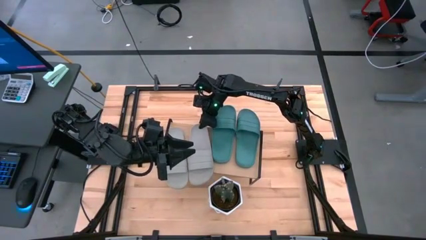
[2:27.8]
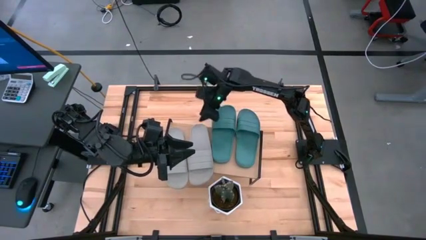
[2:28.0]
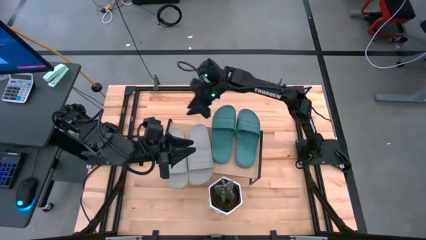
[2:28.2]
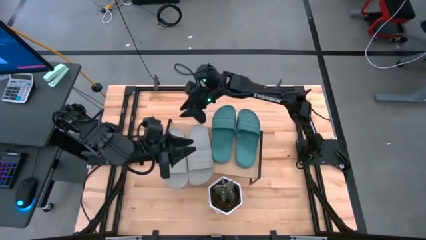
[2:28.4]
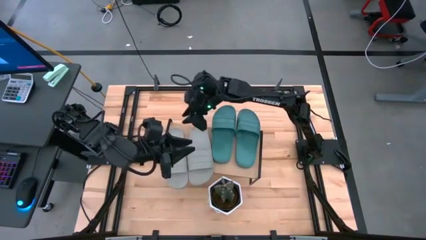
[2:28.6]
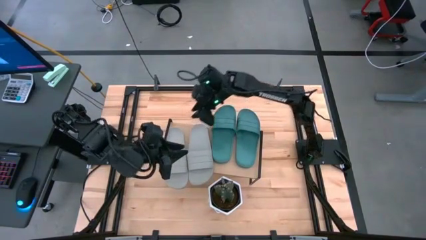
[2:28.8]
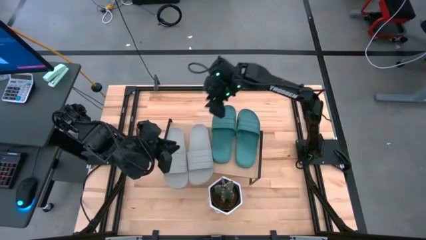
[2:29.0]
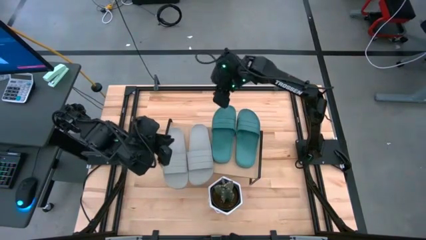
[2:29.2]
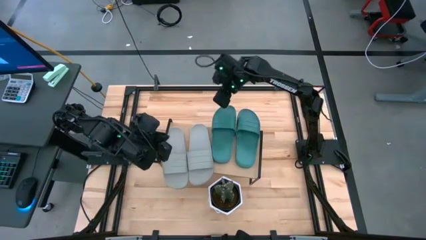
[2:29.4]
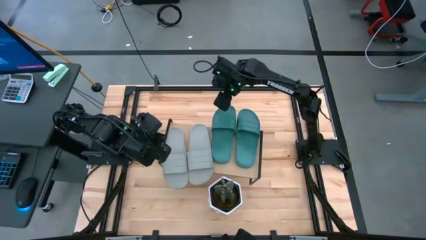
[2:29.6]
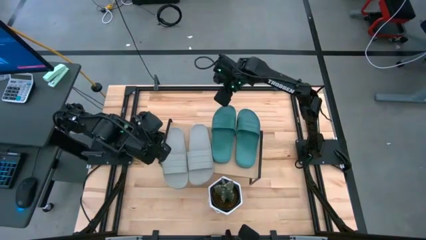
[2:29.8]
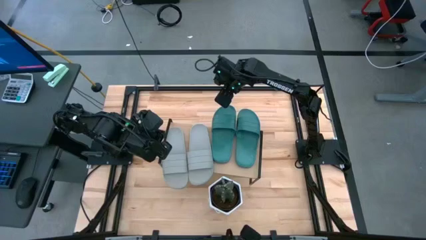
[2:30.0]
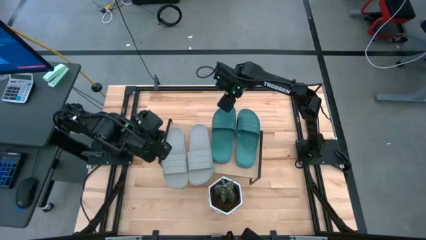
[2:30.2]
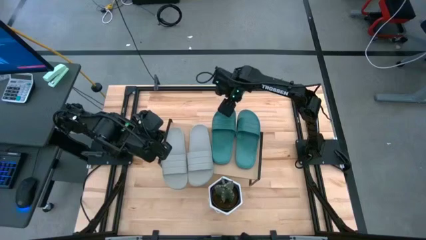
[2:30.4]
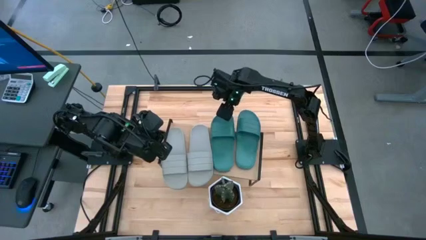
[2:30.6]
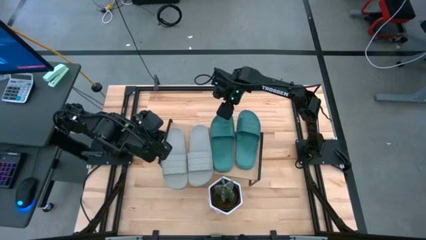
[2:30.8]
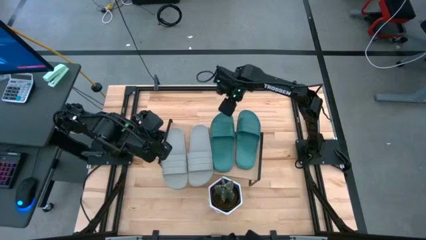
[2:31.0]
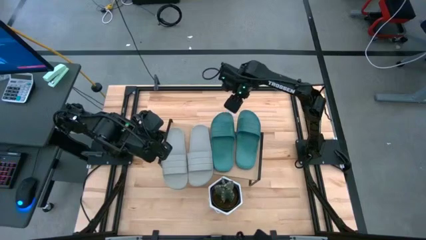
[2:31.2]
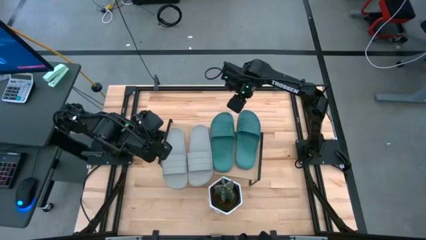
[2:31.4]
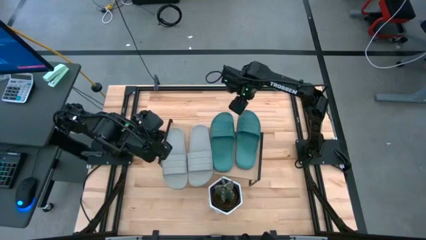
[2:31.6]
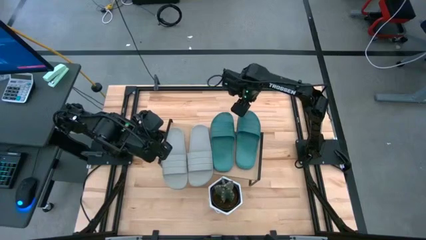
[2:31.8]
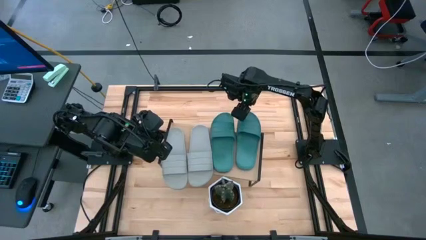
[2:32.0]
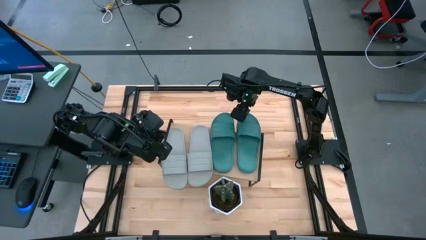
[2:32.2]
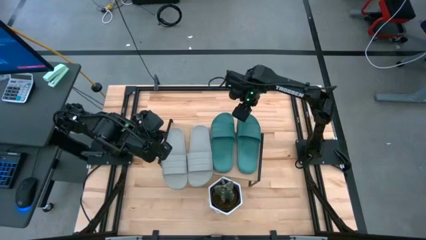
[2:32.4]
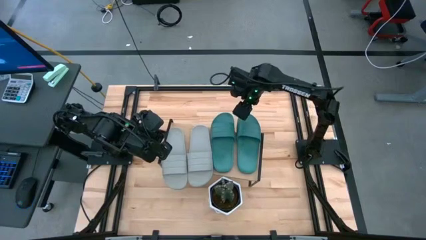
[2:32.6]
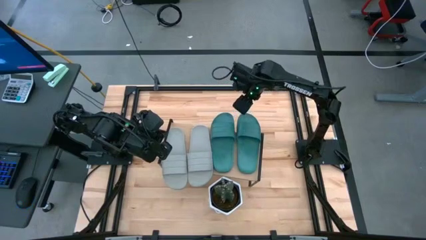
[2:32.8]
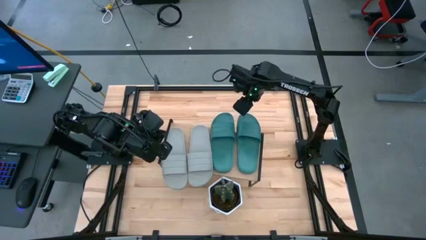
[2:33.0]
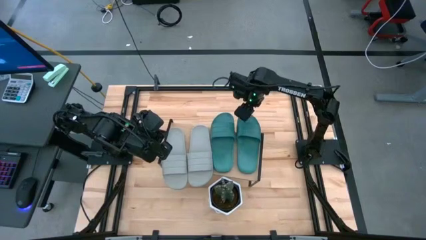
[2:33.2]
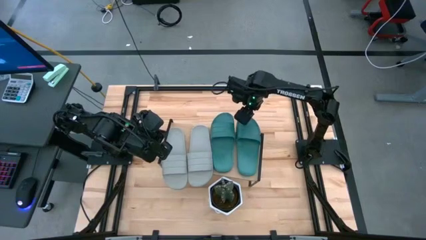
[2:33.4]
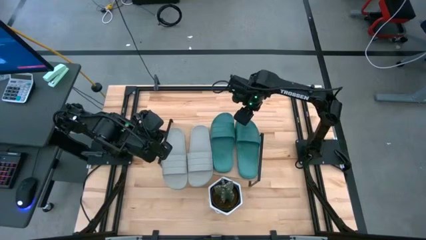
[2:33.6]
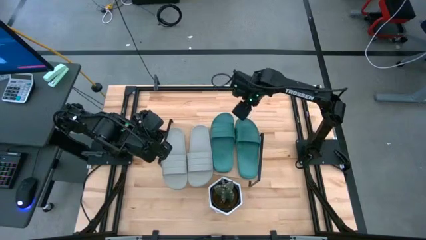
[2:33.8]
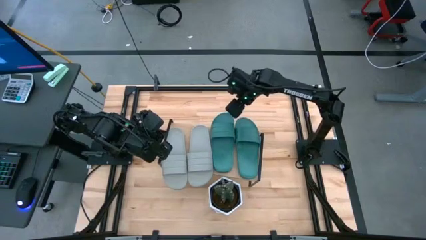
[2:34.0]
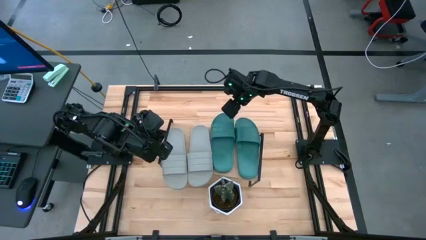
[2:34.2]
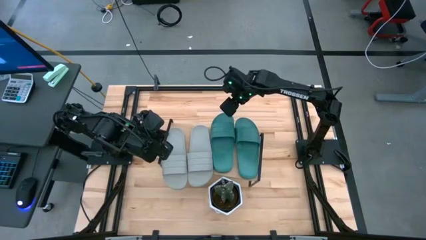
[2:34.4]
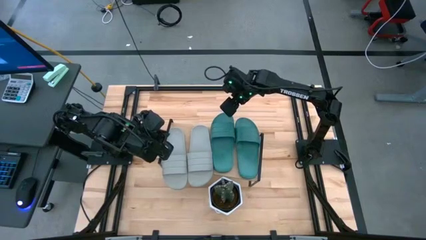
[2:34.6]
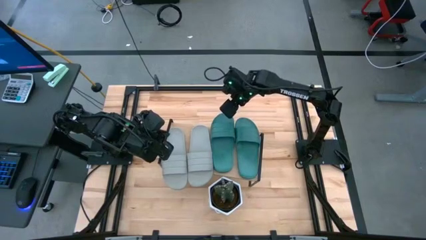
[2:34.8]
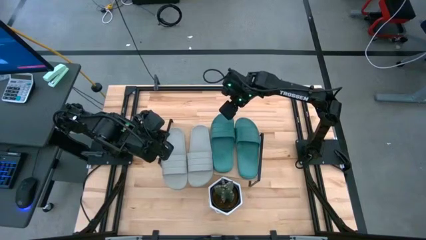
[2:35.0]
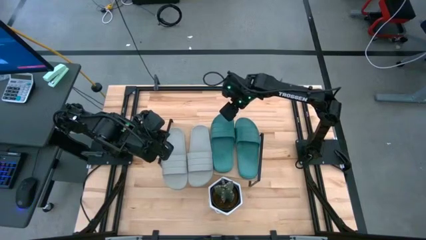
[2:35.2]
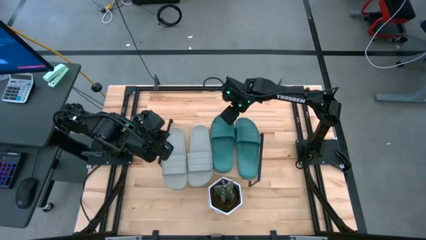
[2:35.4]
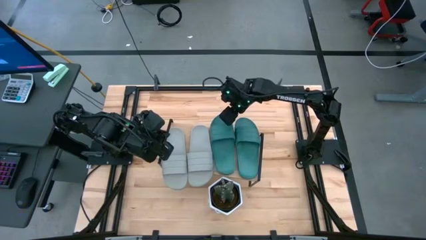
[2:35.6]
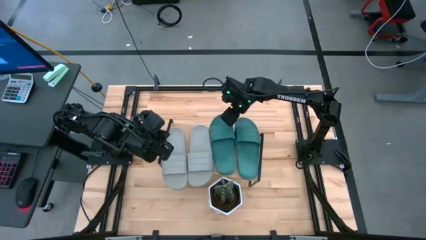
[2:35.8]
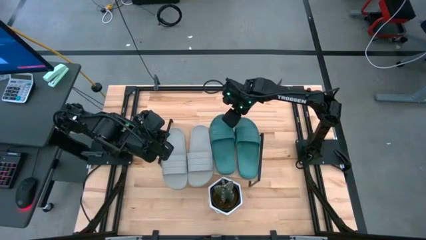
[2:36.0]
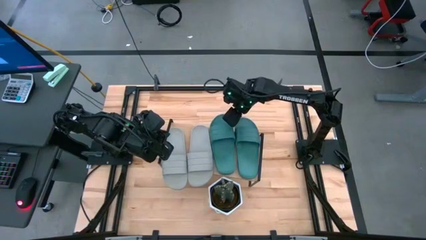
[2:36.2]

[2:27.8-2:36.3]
Task: Pick and place slides into the shelf
Adjust the green slides on the shelf

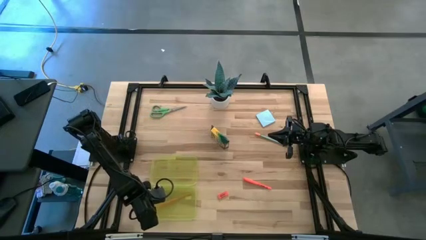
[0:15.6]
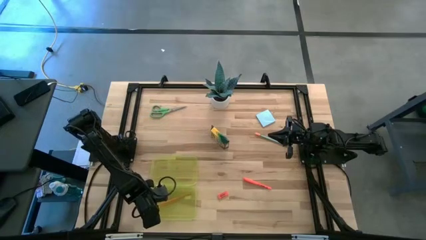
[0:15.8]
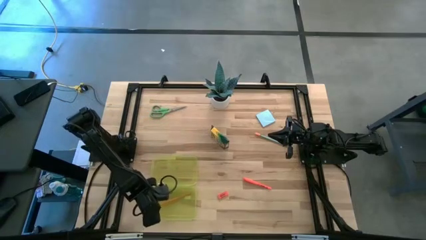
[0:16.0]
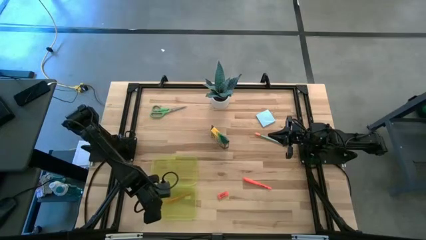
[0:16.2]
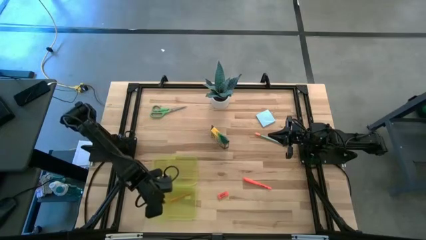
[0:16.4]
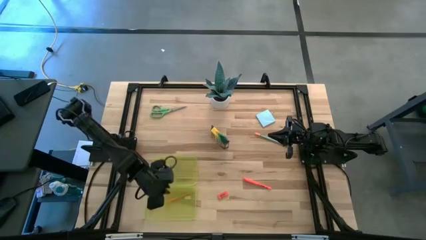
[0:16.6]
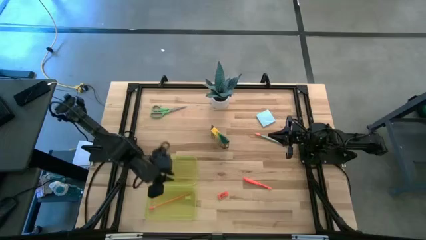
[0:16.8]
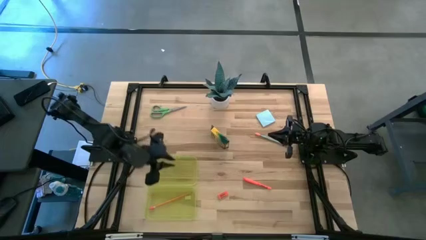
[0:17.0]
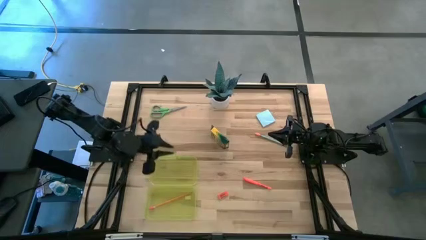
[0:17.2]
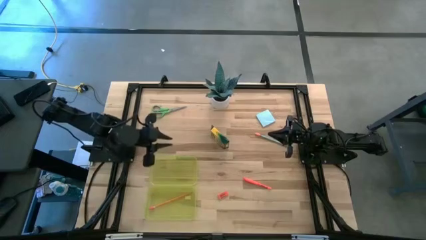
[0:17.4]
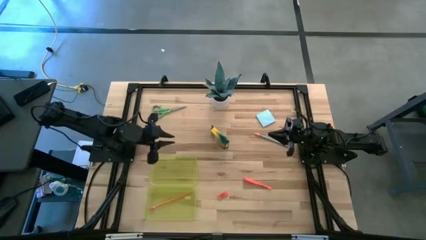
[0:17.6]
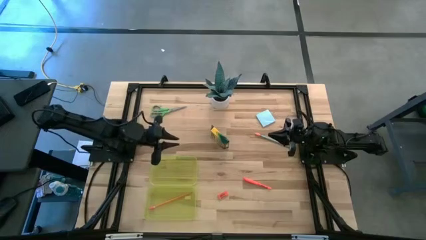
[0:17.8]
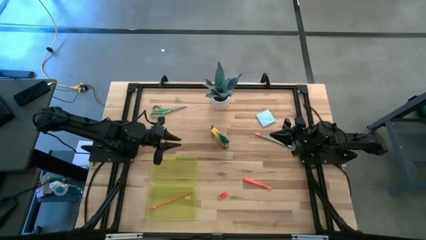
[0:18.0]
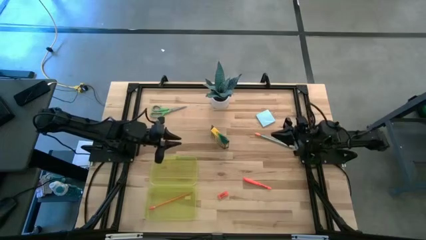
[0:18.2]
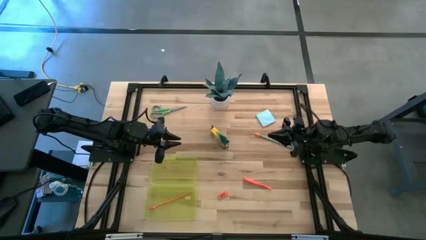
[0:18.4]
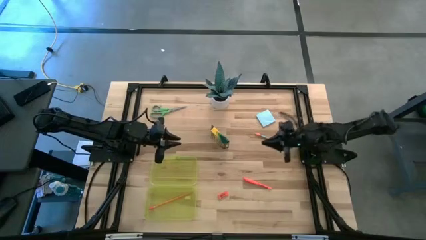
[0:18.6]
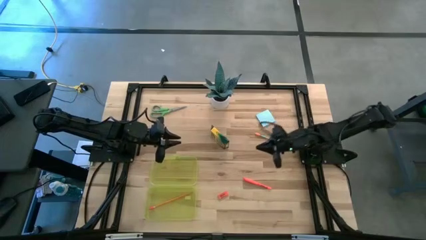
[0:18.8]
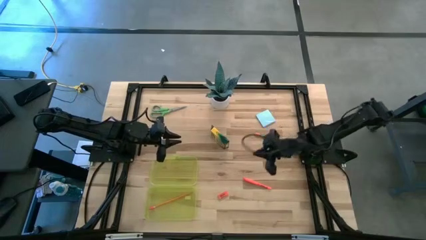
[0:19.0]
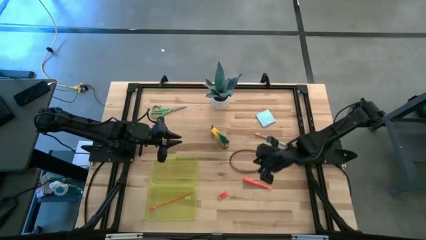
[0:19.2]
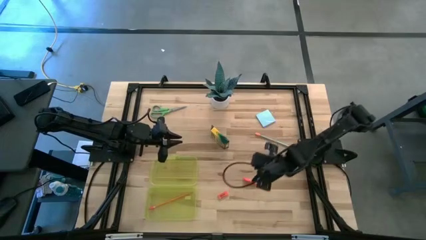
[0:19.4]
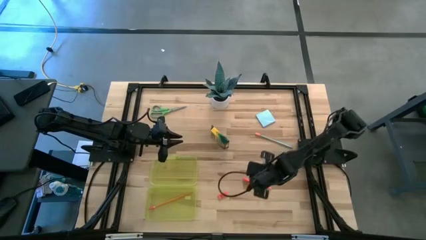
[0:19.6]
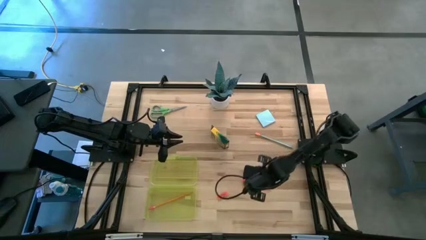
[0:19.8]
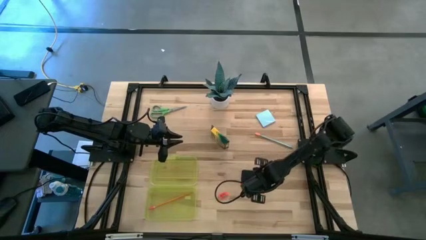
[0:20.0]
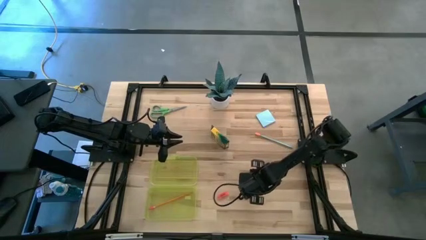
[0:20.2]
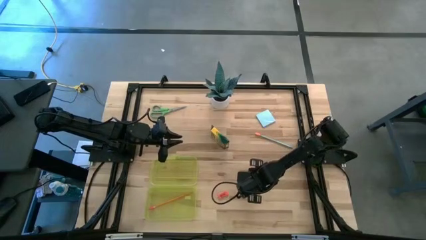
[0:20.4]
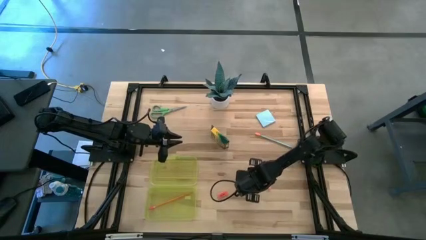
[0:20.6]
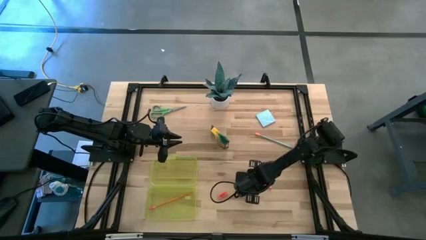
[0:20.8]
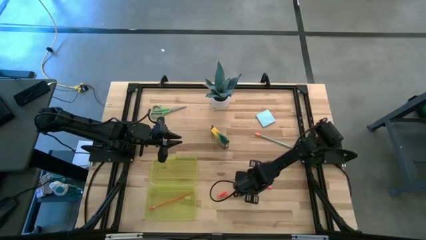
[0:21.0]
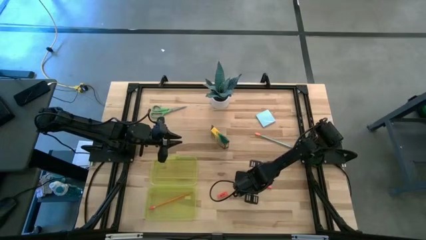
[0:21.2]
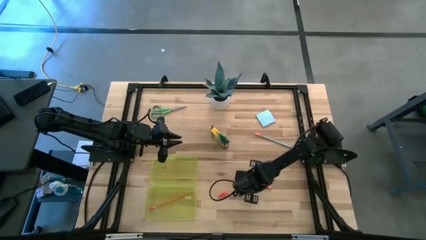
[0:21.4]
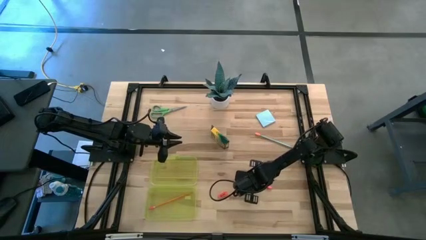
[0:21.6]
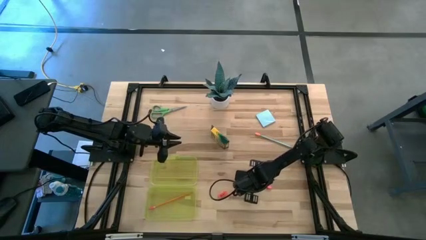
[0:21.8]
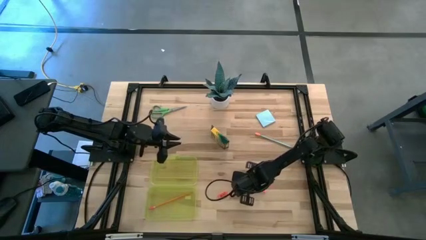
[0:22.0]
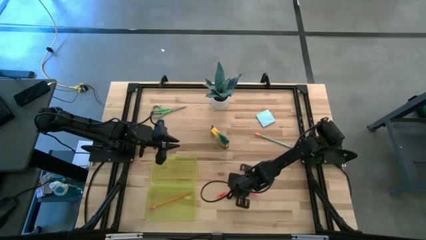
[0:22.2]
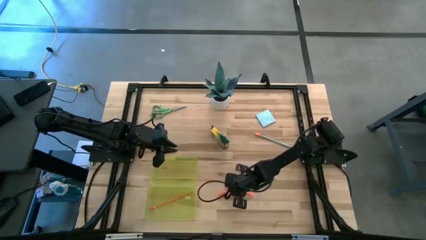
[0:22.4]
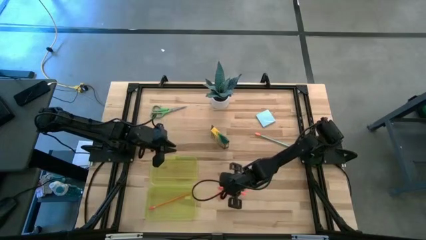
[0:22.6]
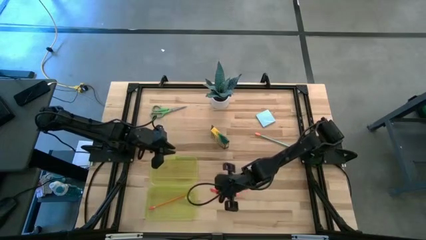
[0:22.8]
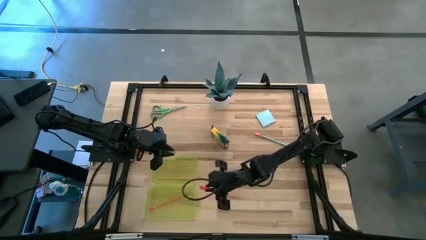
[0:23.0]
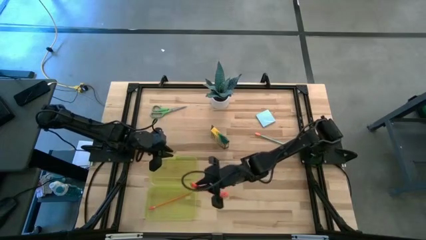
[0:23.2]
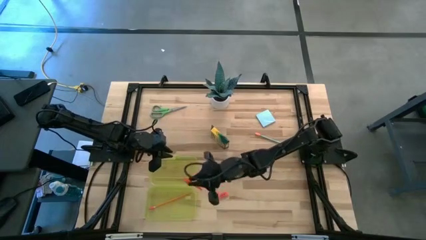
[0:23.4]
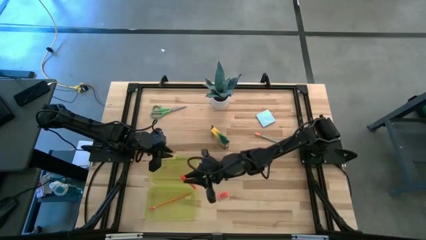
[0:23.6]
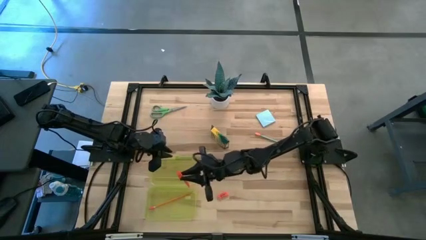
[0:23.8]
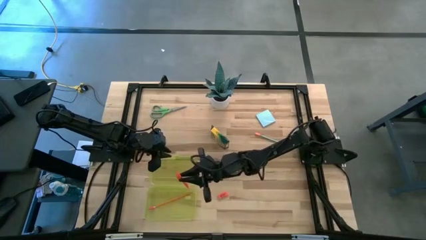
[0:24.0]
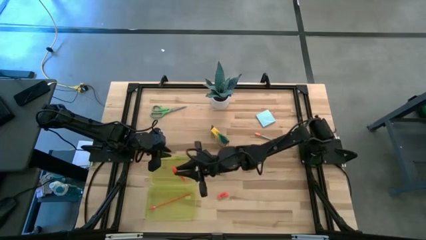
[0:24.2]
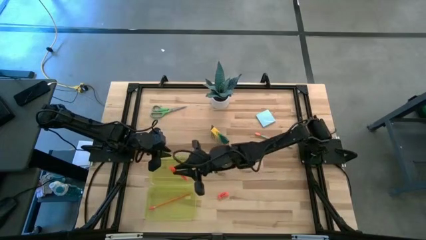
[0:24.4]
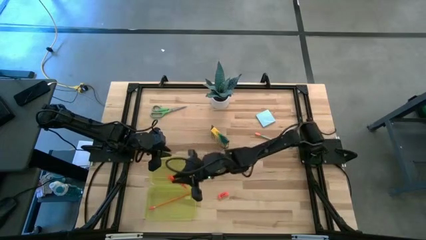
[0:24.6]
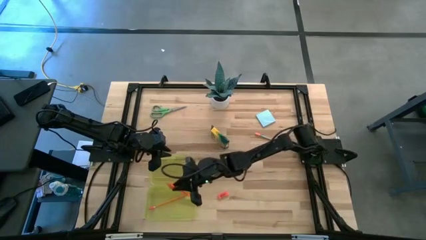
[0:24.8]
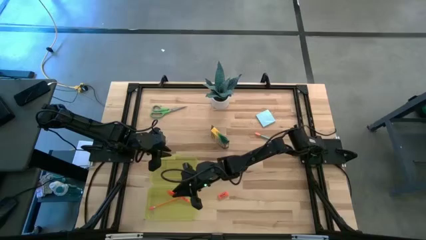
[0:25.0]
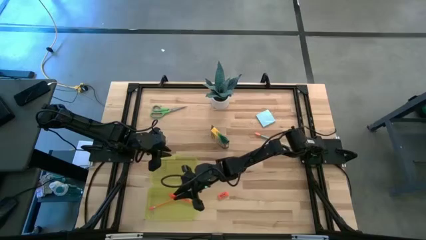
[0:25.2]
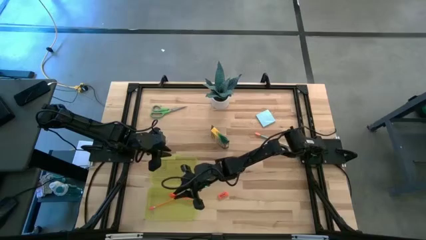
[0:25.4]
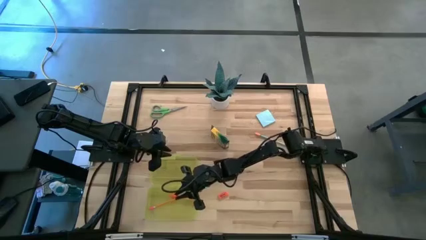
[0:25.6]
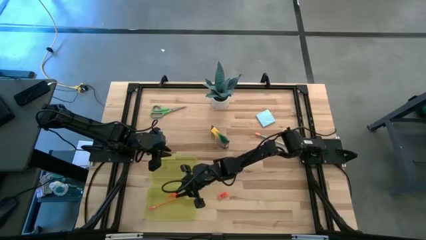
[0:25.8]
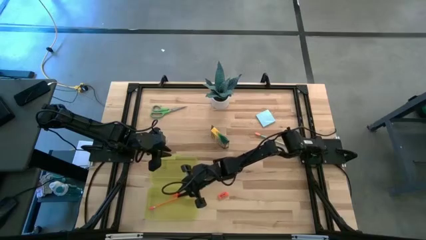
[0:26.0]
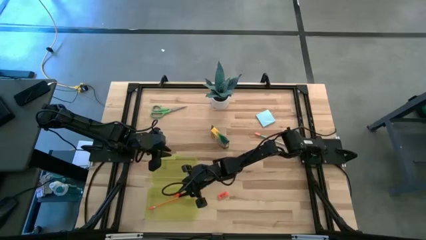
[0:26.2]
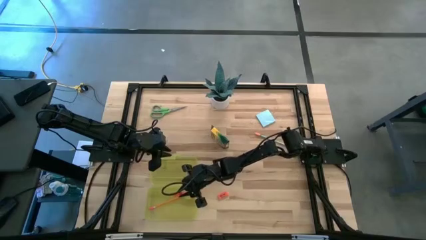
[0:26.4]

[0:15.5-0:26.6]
Task: Pack school essentials
Put the orange pen into the yellow supply box
